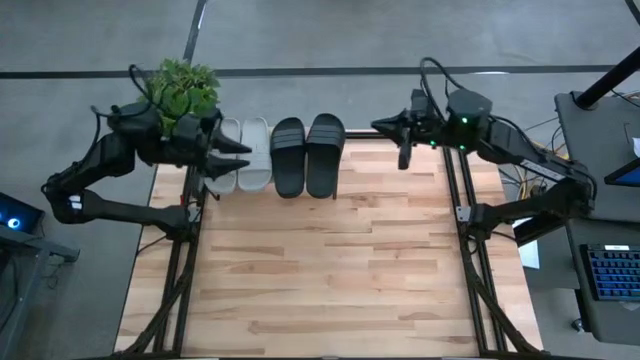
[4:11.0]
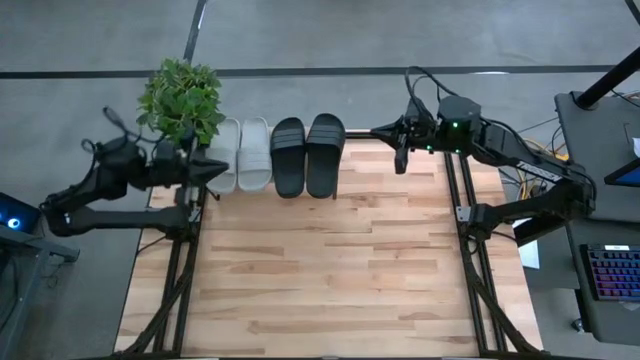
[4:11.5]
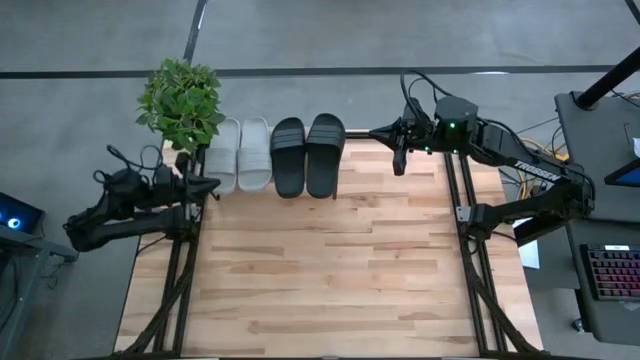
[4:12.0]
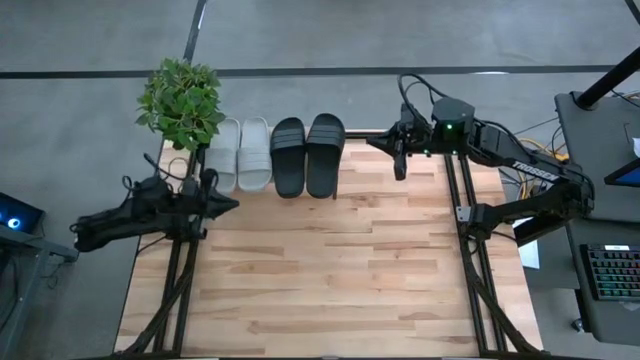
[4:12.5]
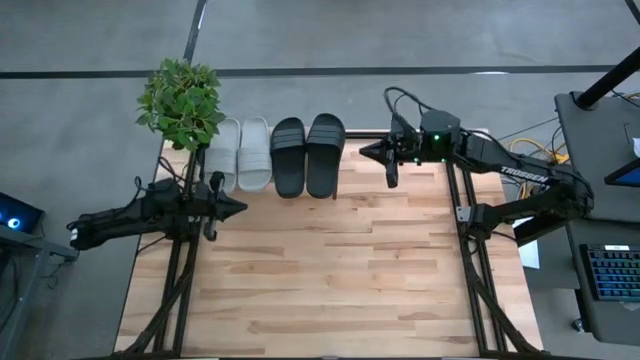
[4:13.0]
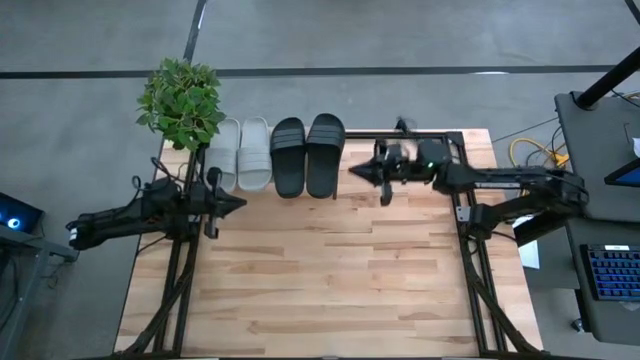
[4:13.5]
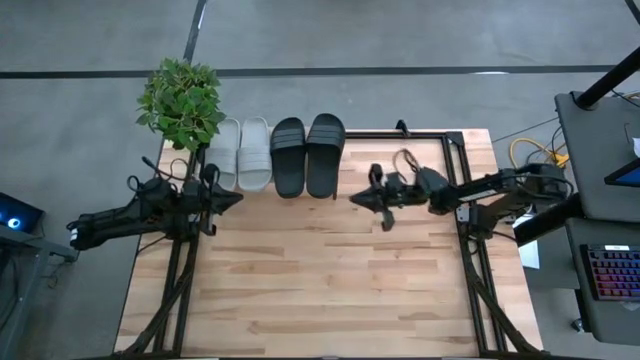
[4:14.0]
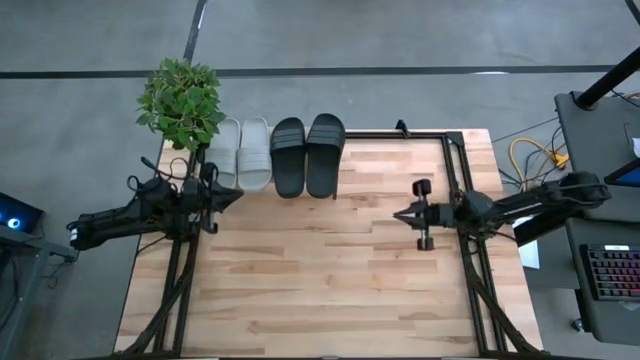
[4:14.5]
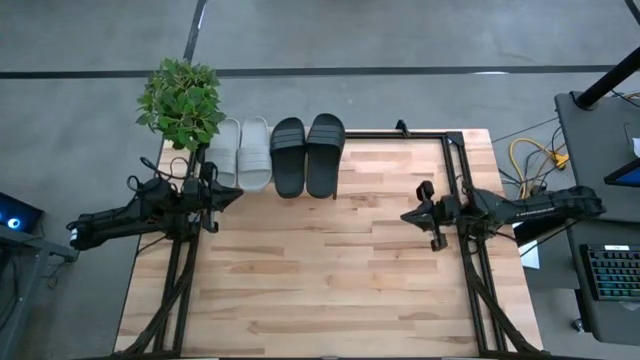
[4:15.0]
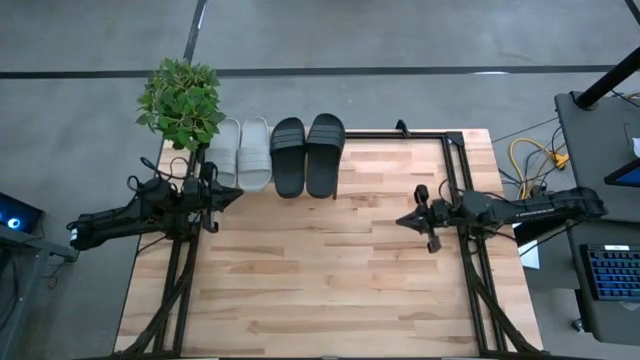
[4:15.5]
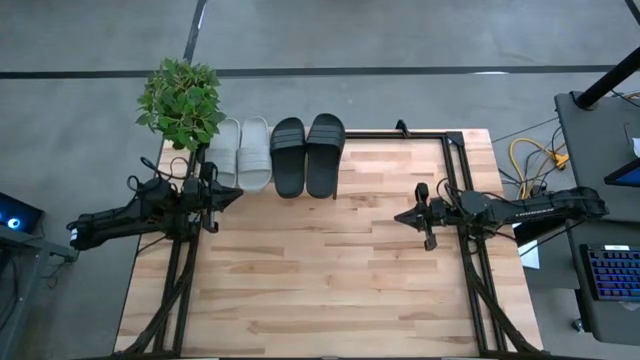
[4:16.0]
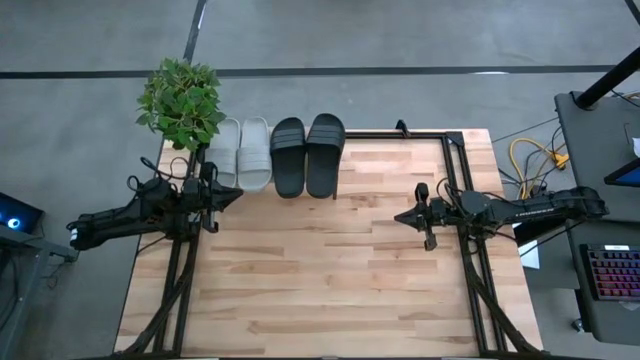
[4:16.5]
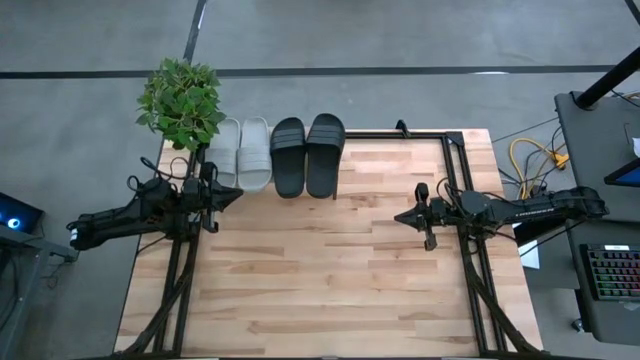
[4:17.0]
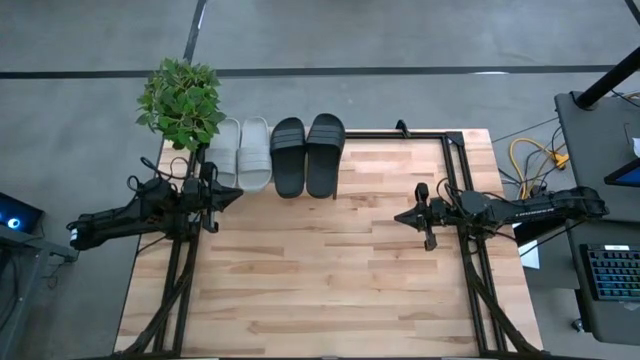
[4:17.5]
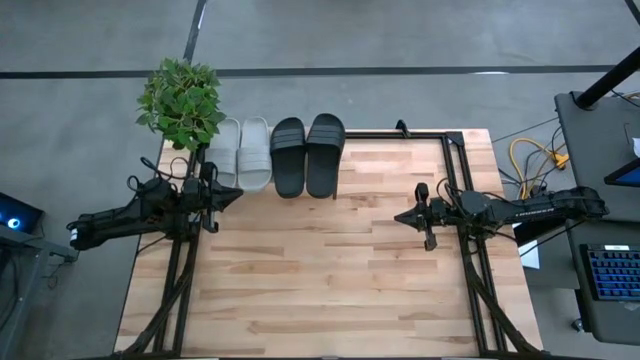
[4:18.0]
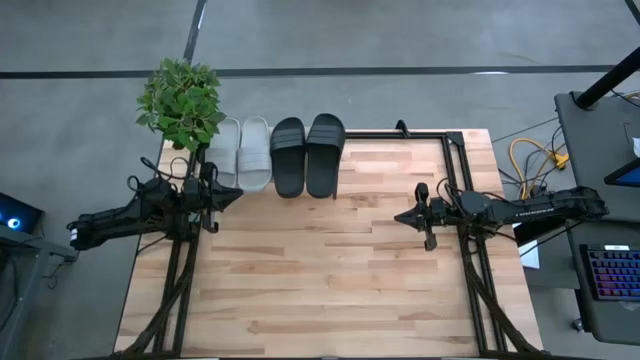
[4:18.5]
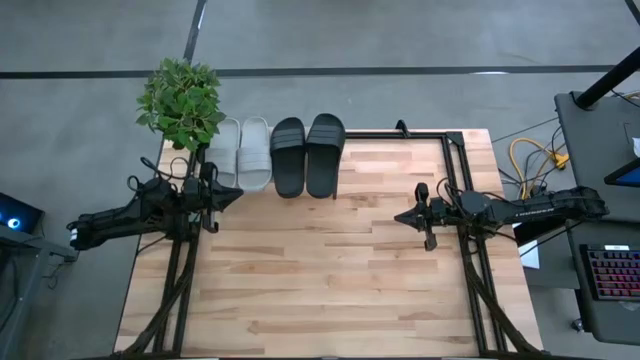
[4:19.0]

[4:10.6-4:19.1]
Task: Pick and place slides into the shelf
Return to Home Position

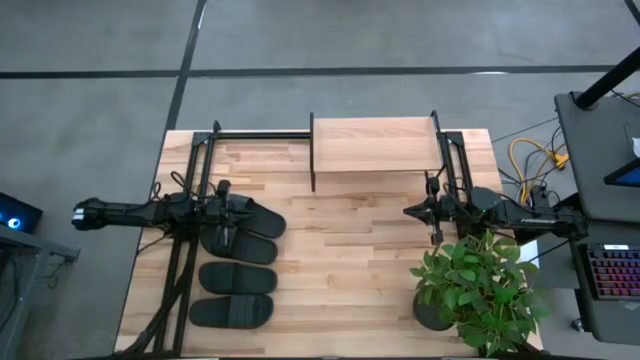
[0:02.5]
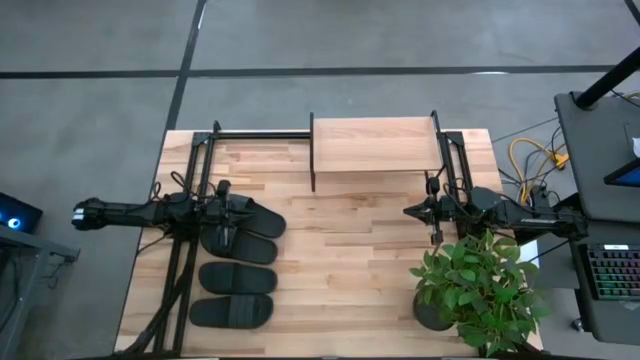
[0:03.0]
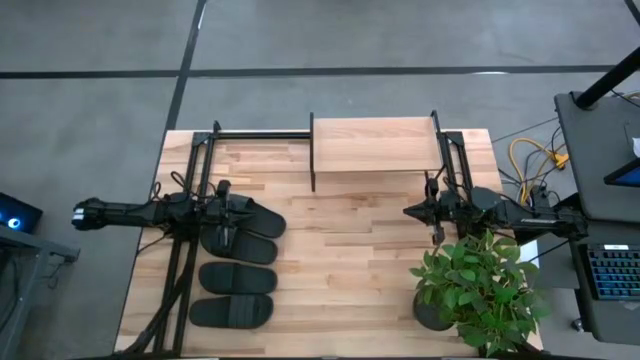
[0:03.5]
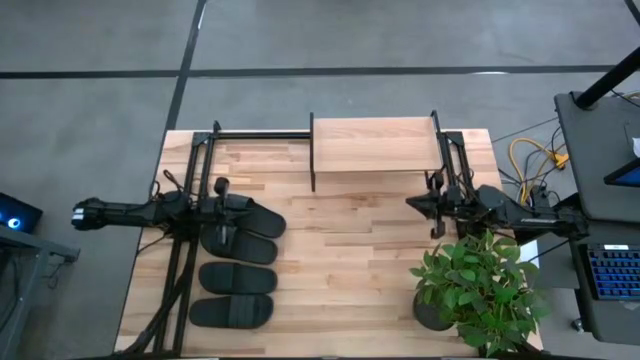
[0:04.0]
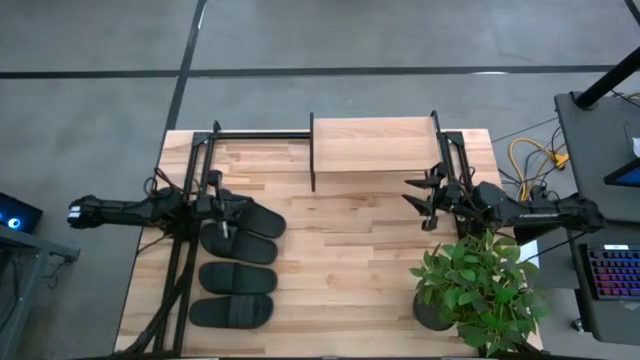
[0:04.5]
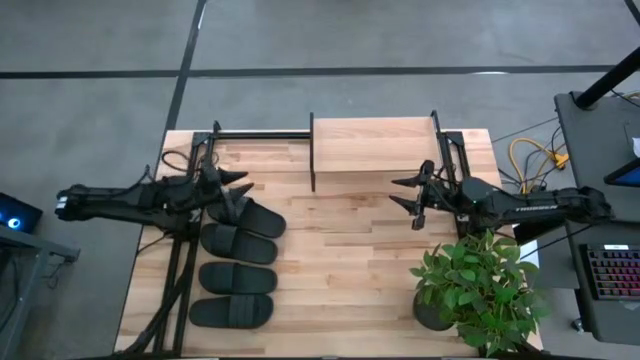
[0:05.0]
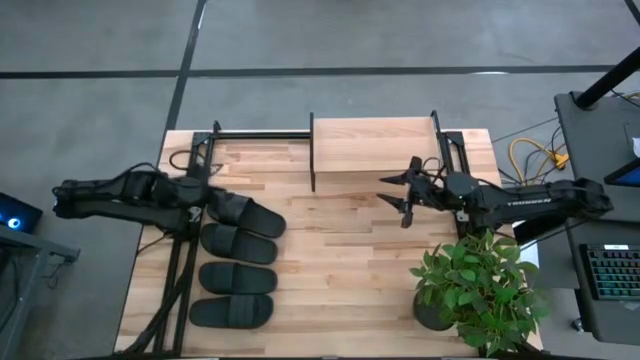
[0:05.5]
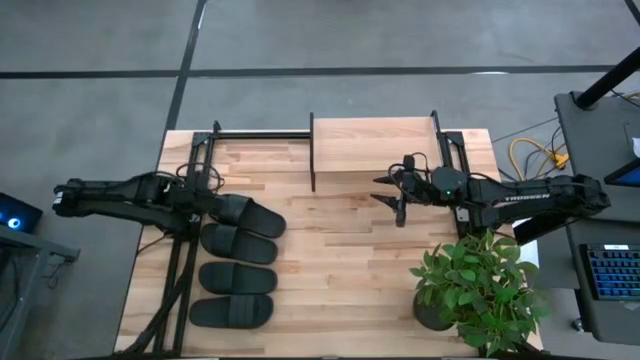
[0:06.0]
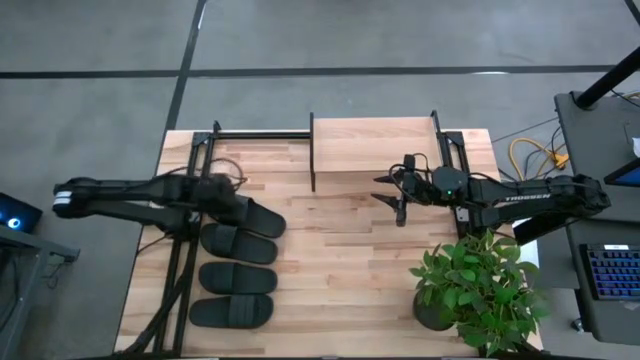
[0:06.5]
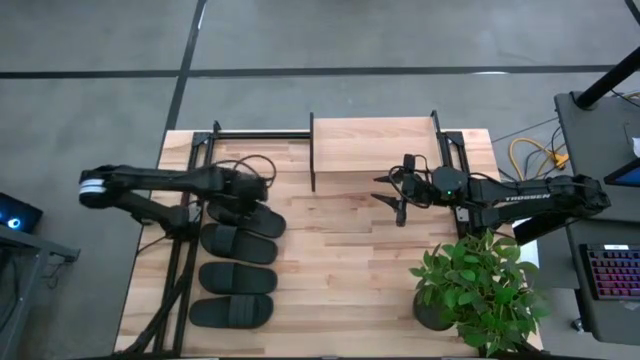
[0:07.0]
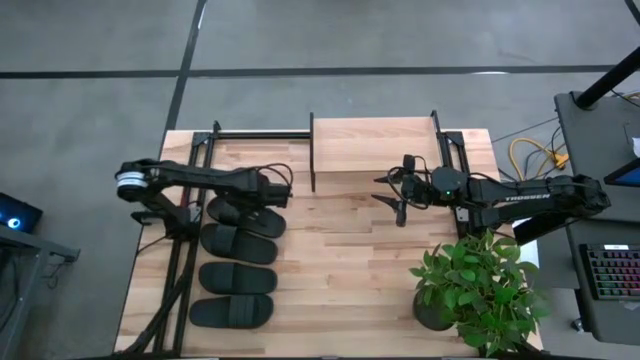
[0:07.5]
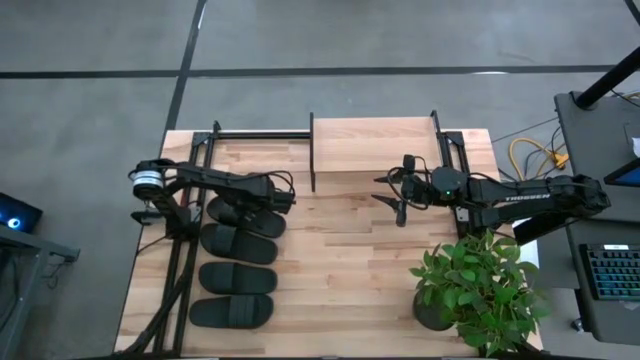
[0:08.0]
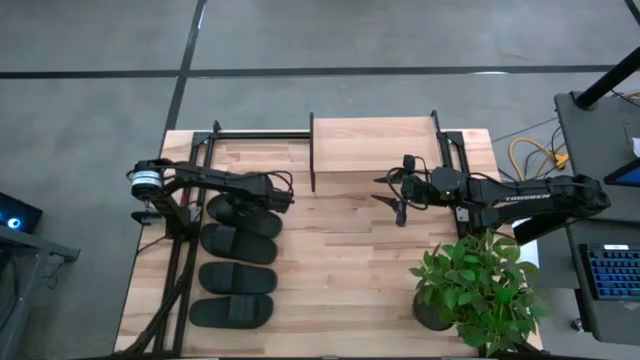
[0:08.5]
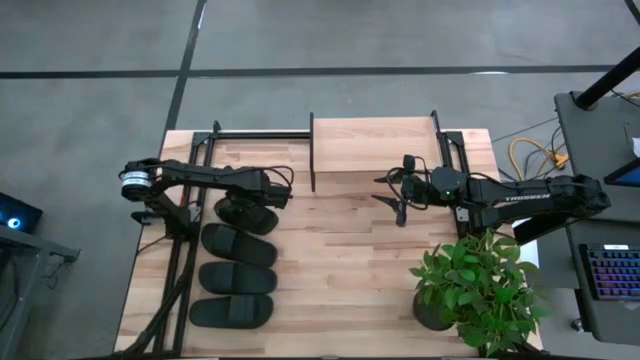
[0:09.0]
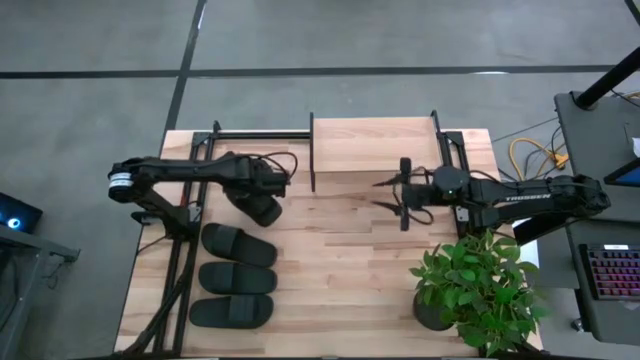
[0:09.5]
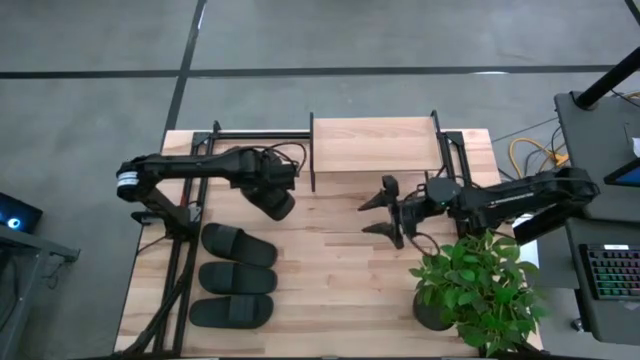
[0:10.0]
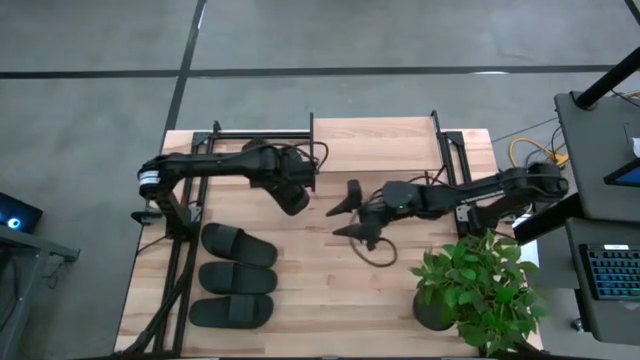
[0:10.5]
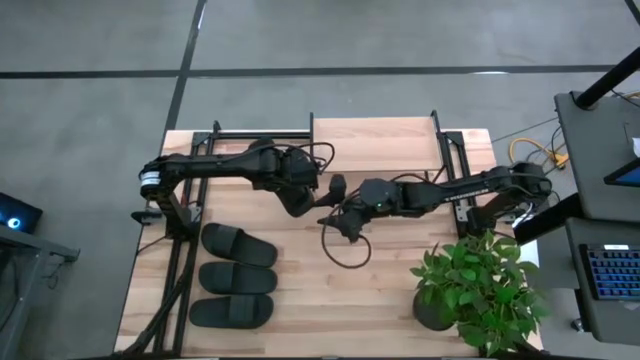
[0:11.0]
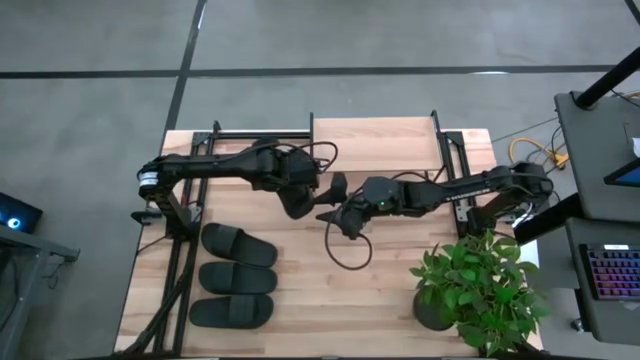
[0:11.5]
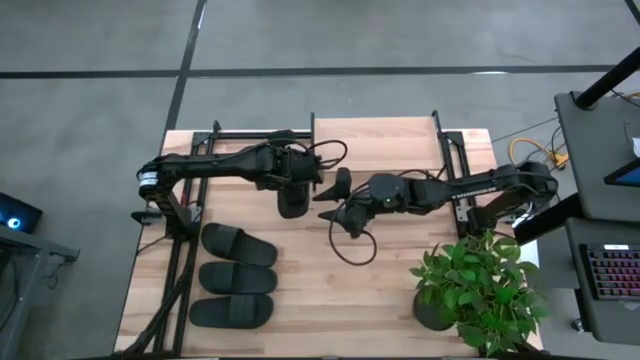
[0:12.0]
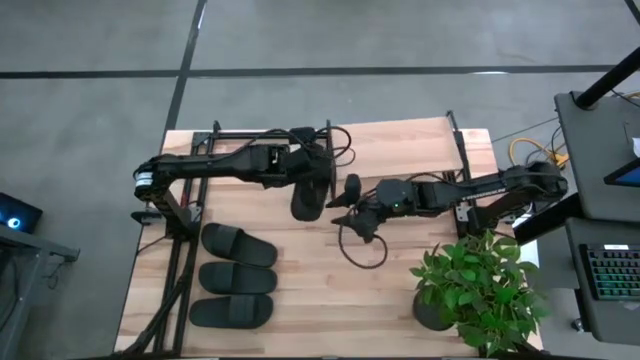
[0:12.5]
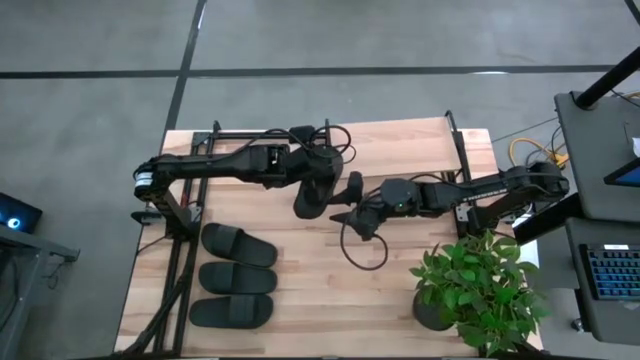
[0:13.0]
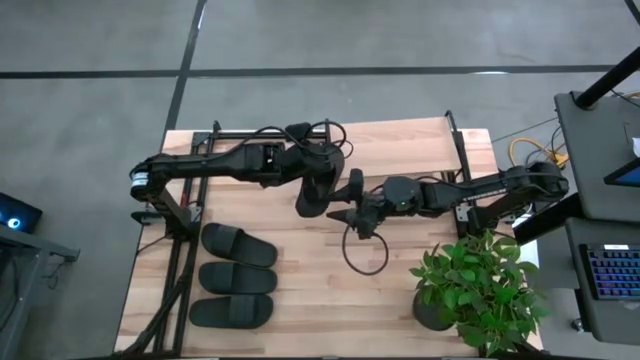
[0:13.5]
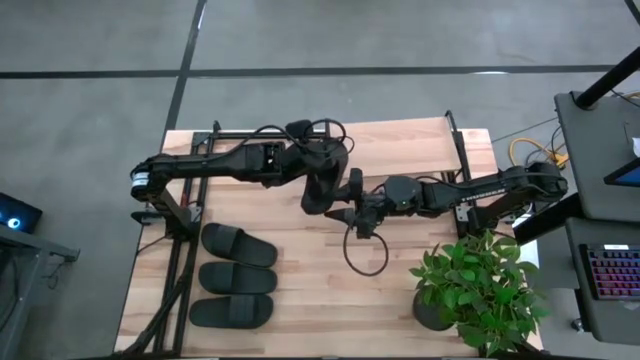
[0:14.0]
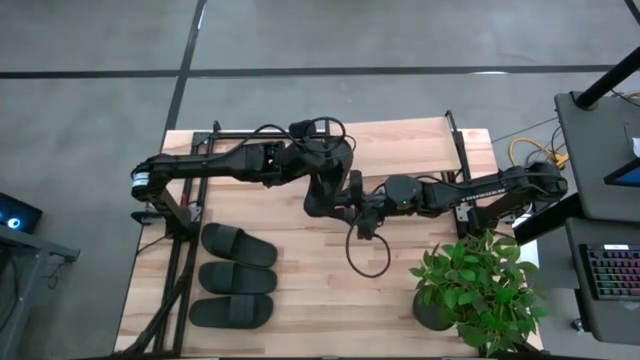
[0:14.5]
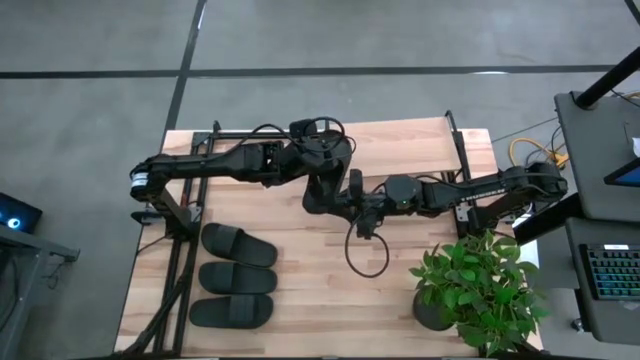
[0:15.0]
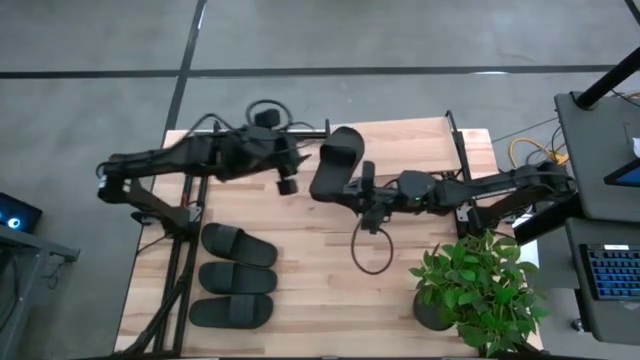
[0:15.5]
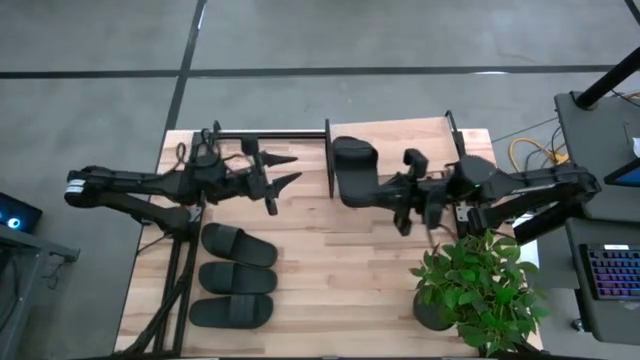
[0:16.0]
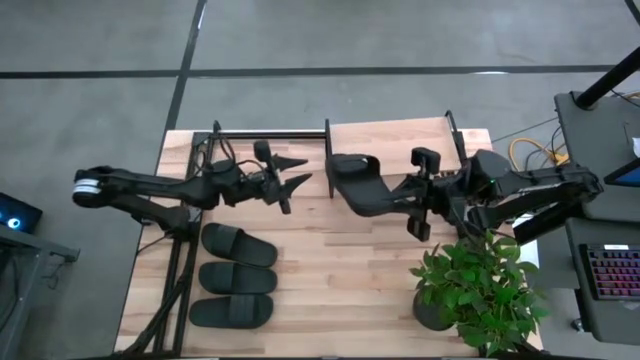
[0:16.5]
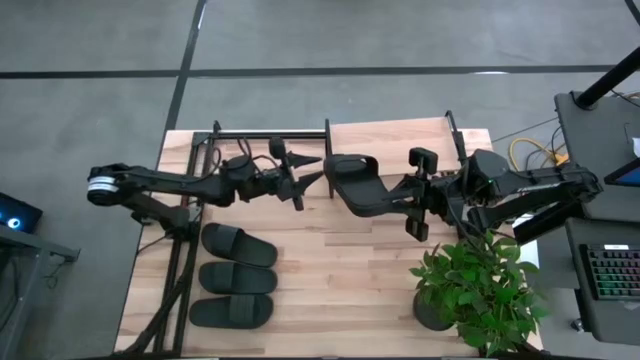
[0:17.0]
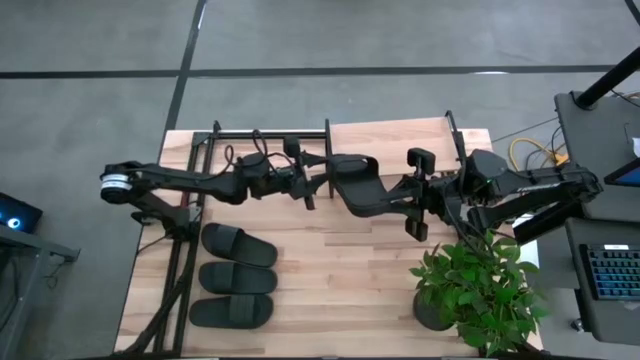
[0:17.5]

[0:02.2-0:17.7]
Task: Pick and place slides into the shelf
Put the black slipper on the shelf
